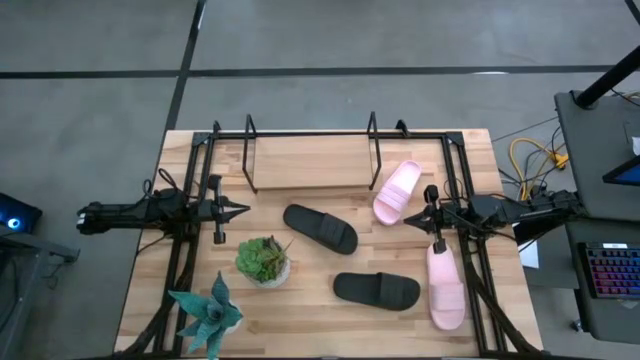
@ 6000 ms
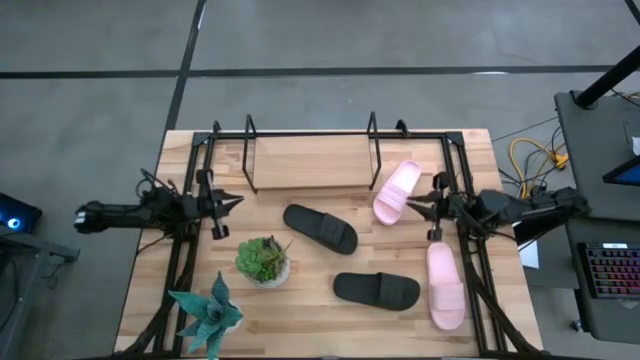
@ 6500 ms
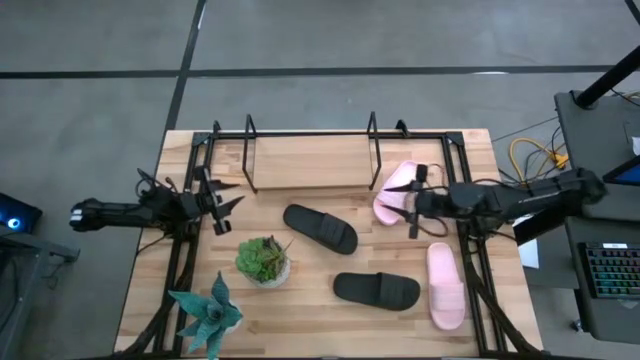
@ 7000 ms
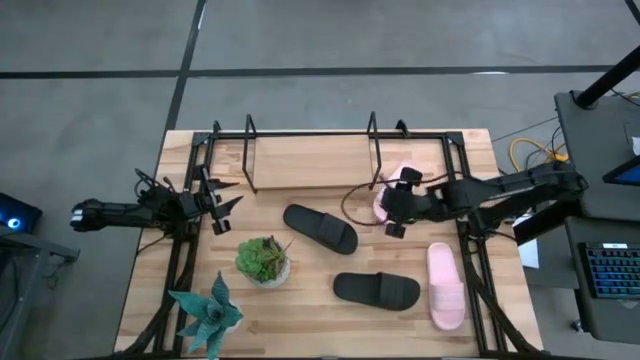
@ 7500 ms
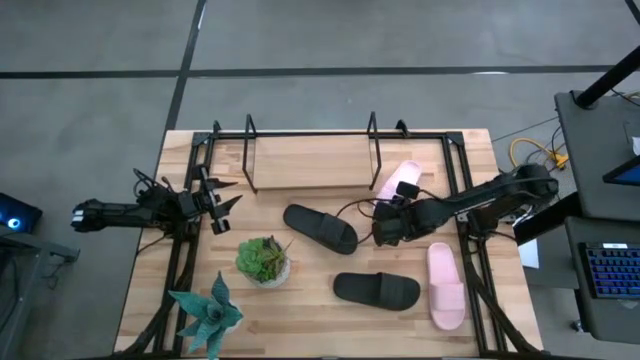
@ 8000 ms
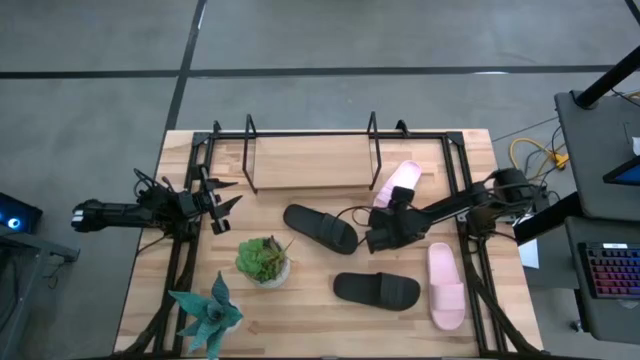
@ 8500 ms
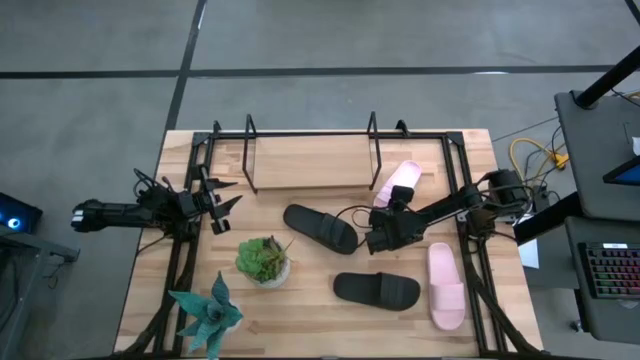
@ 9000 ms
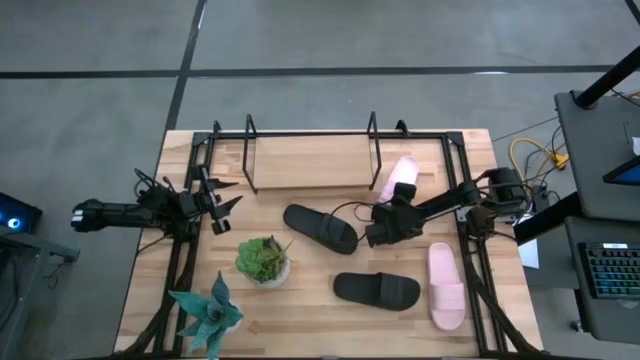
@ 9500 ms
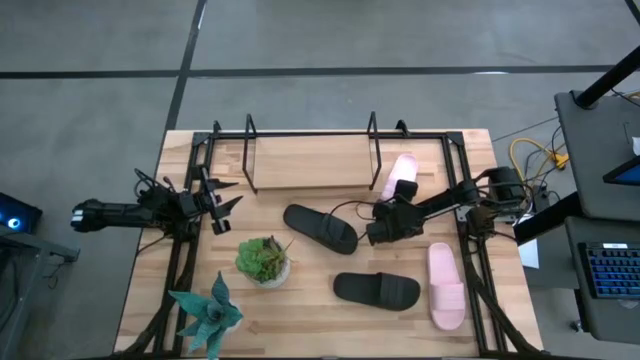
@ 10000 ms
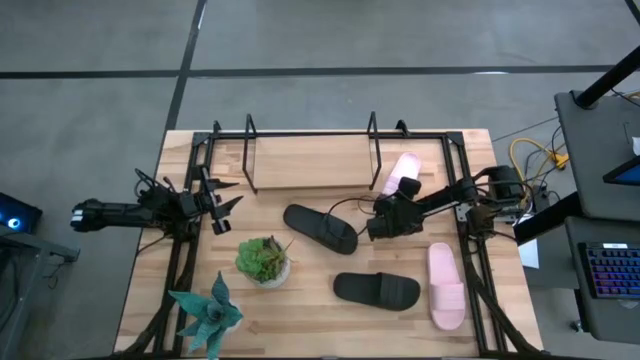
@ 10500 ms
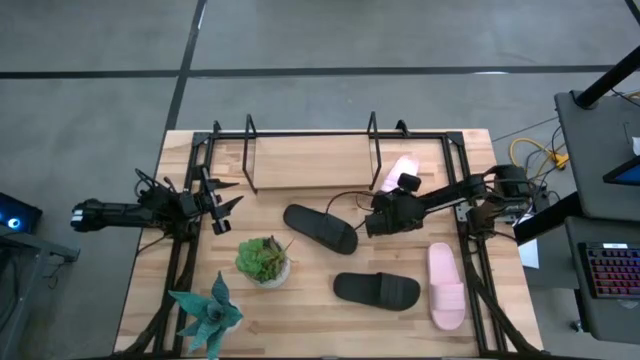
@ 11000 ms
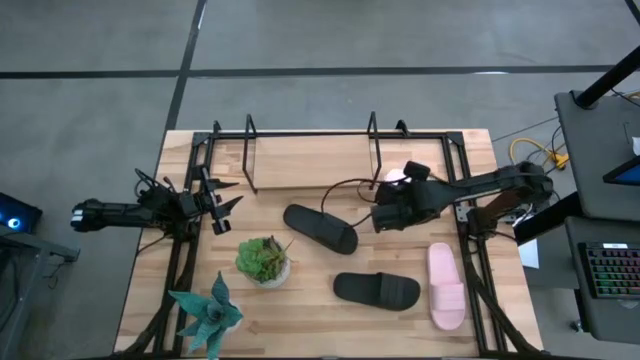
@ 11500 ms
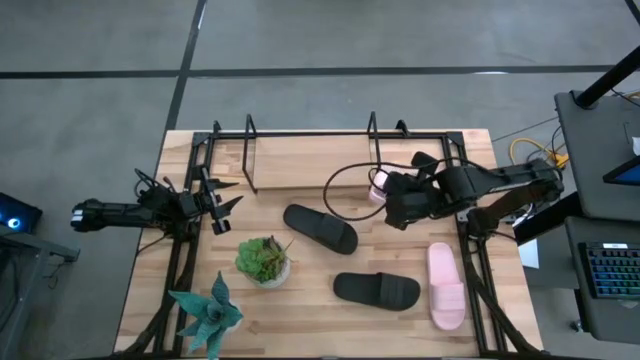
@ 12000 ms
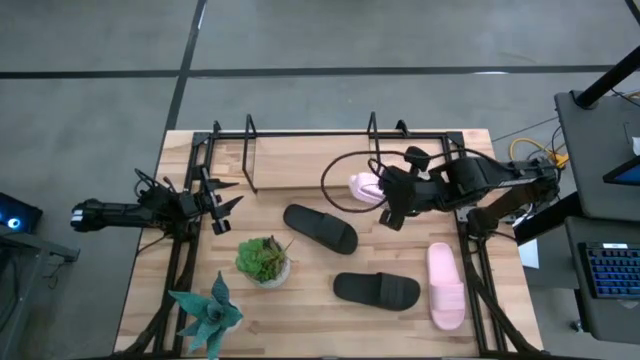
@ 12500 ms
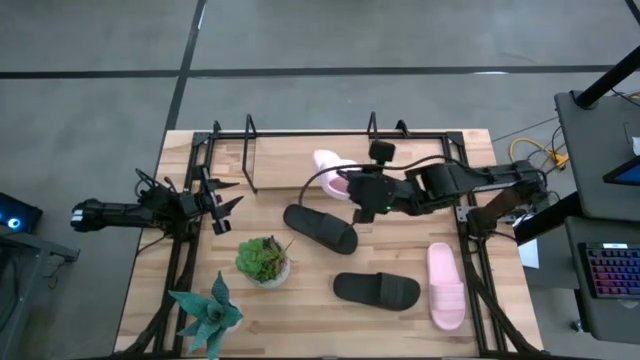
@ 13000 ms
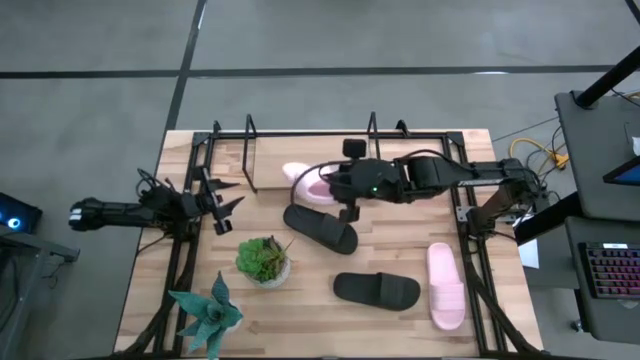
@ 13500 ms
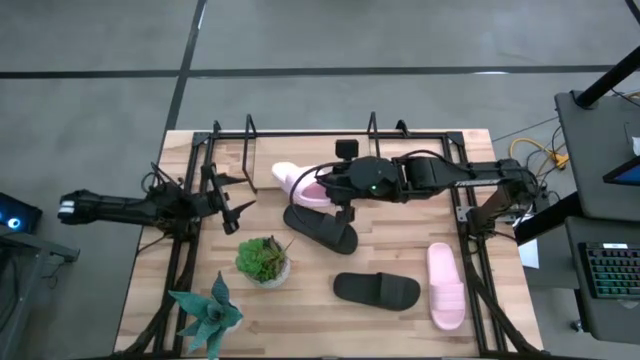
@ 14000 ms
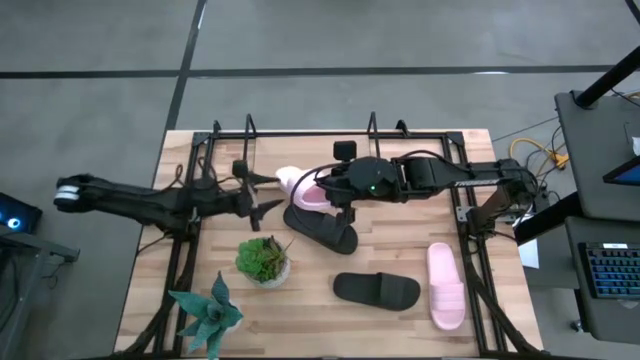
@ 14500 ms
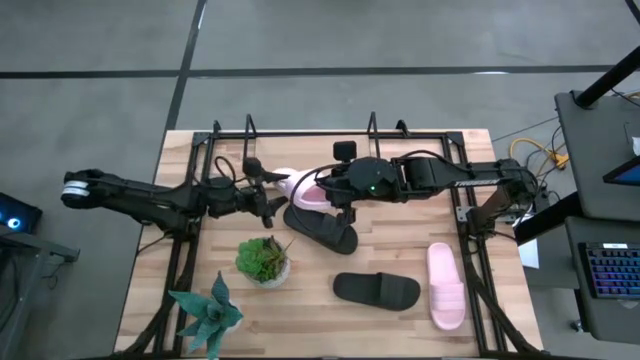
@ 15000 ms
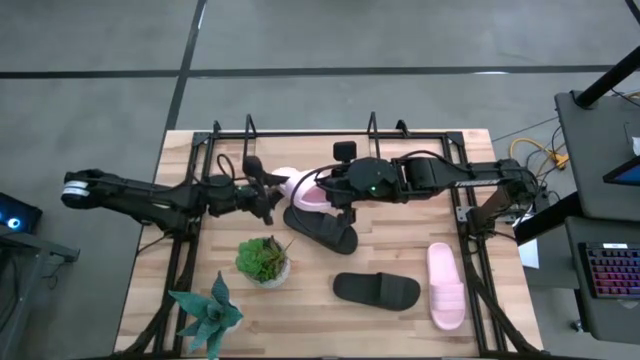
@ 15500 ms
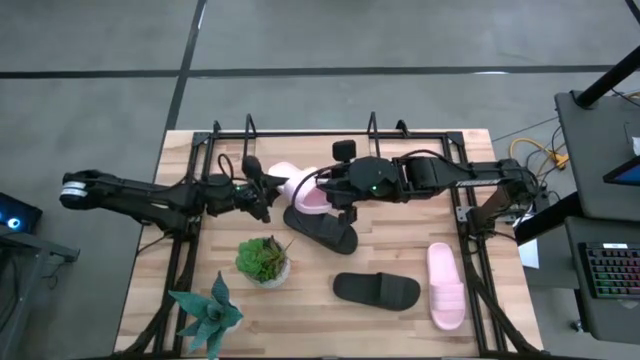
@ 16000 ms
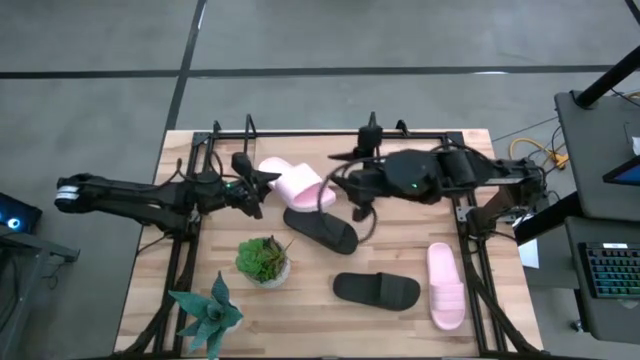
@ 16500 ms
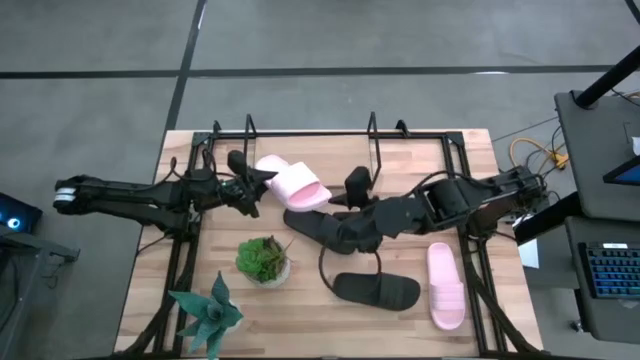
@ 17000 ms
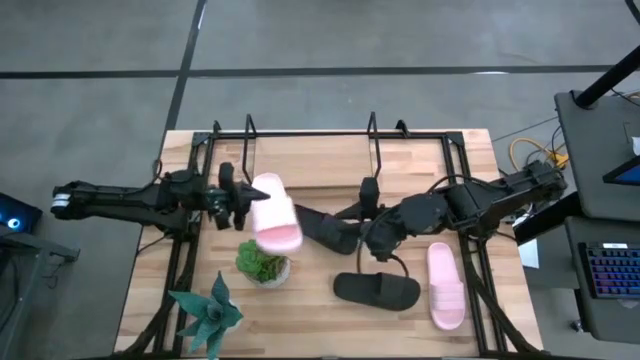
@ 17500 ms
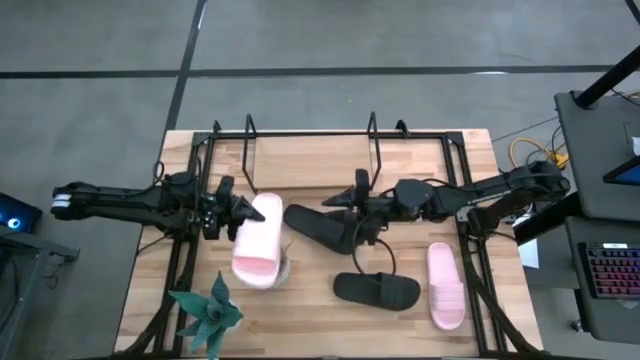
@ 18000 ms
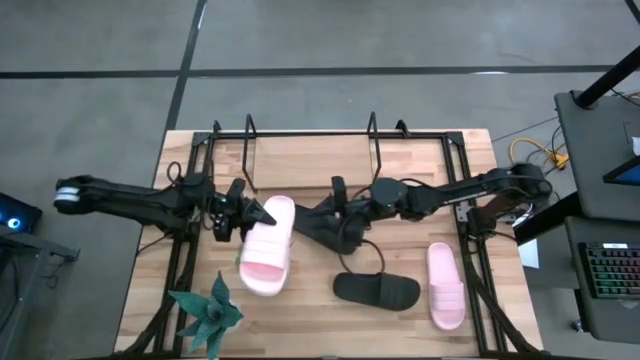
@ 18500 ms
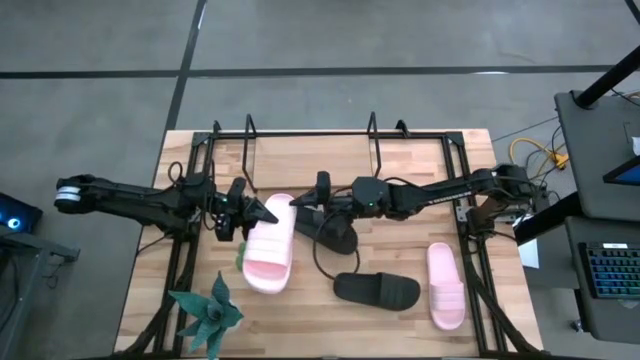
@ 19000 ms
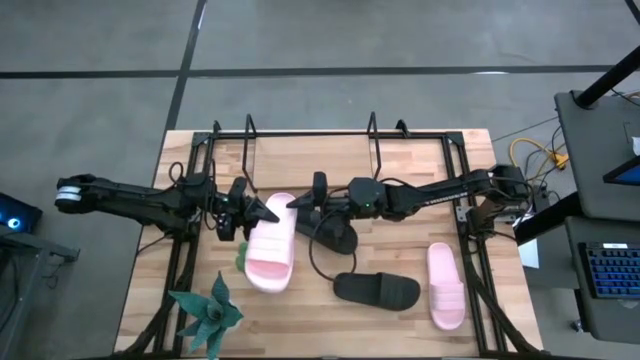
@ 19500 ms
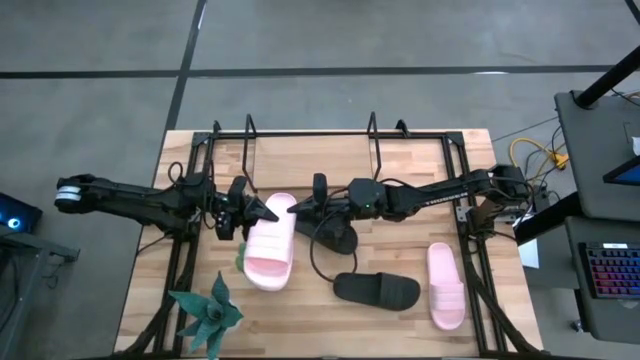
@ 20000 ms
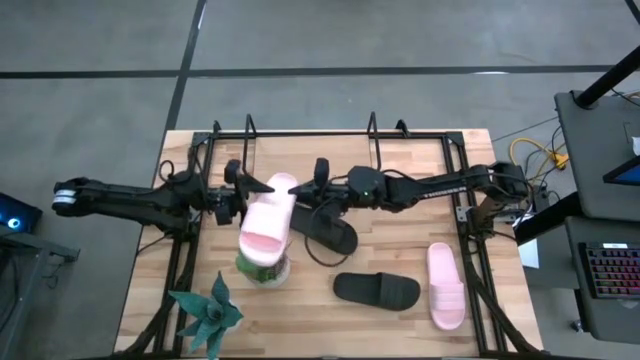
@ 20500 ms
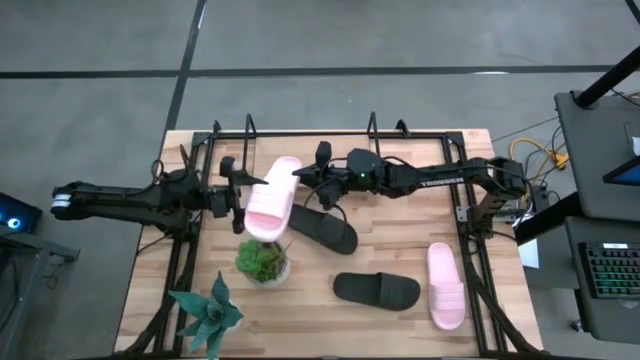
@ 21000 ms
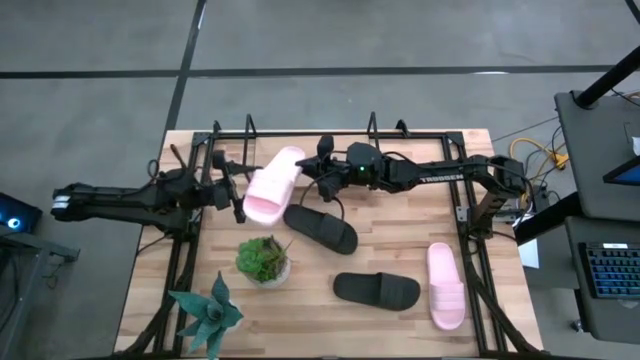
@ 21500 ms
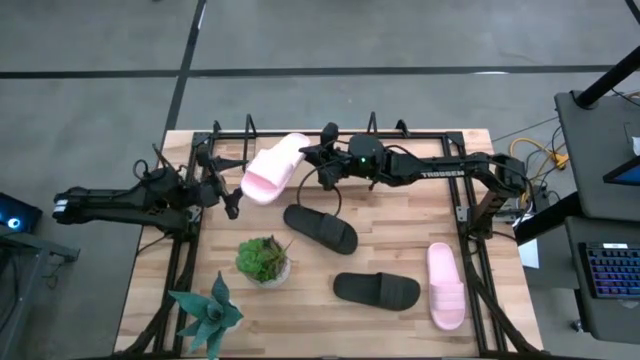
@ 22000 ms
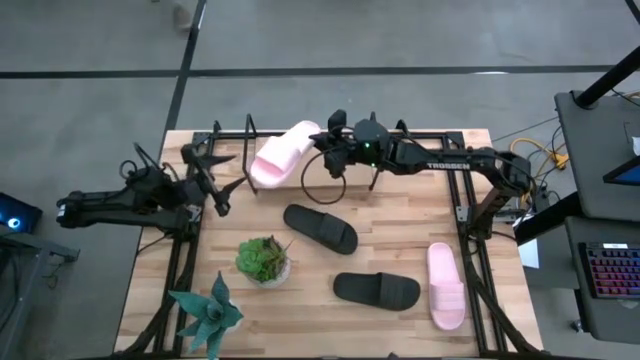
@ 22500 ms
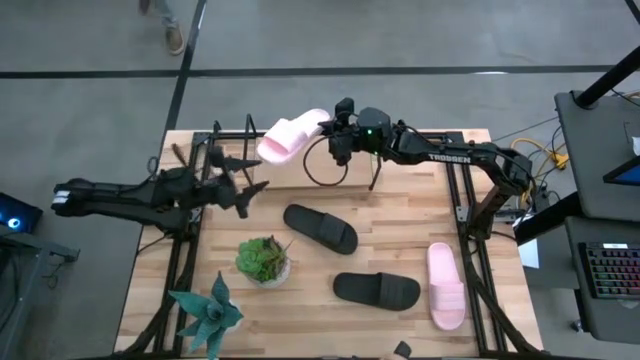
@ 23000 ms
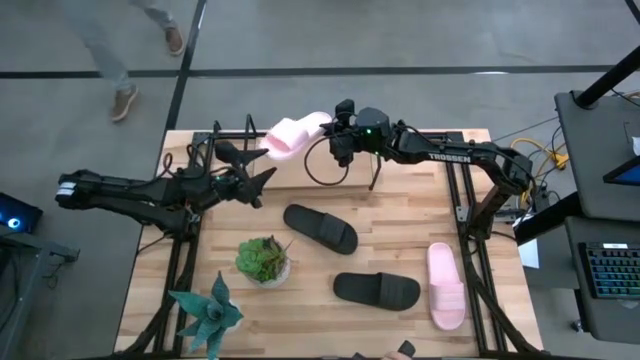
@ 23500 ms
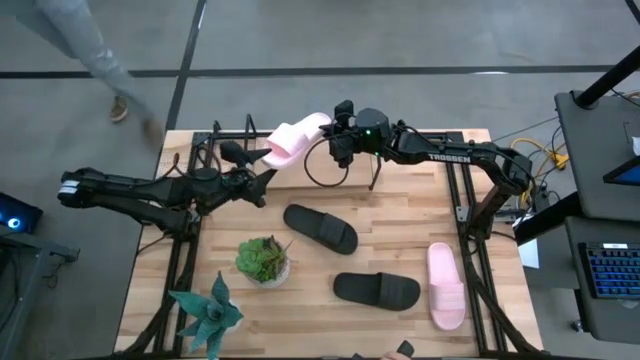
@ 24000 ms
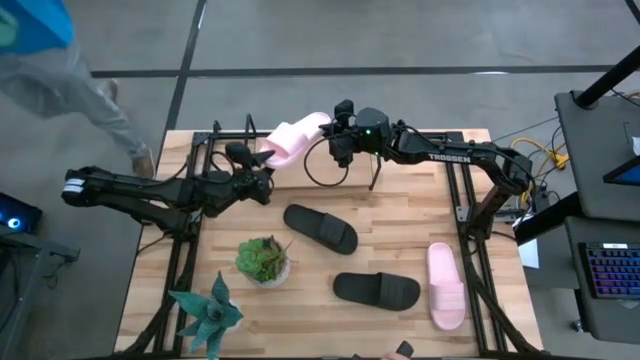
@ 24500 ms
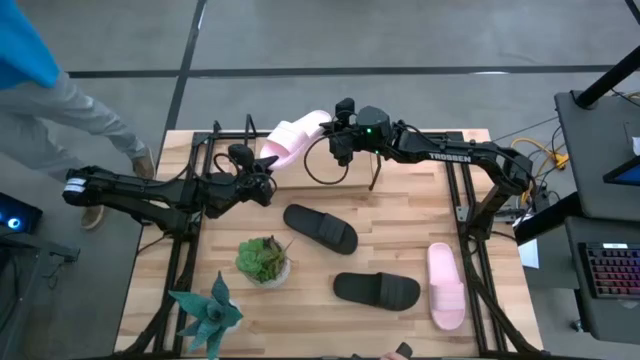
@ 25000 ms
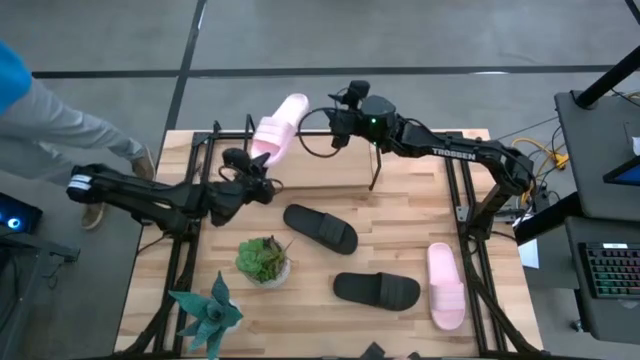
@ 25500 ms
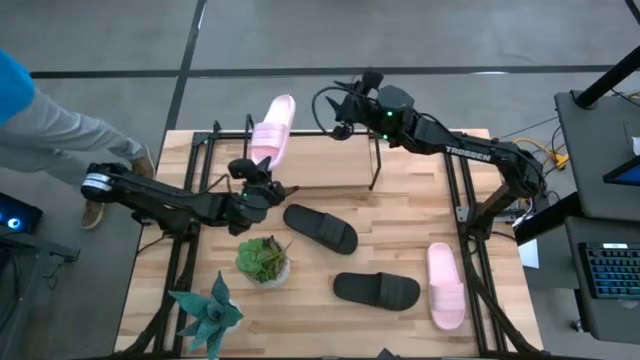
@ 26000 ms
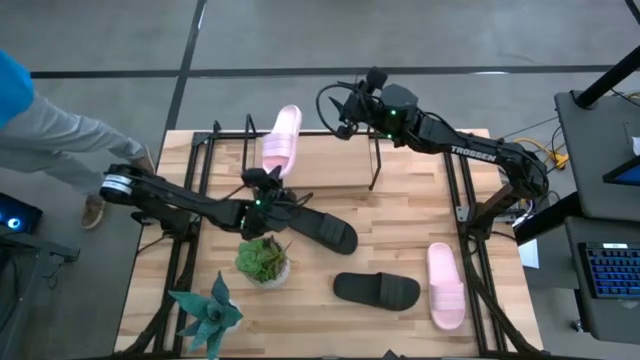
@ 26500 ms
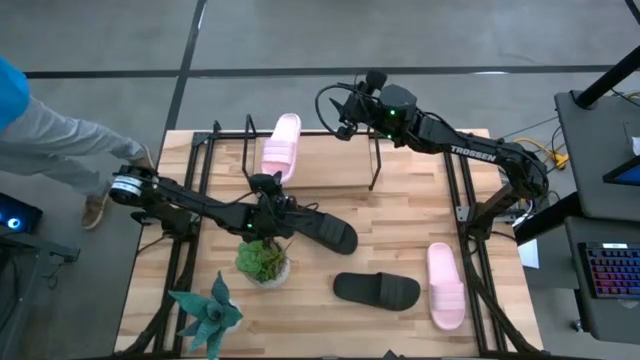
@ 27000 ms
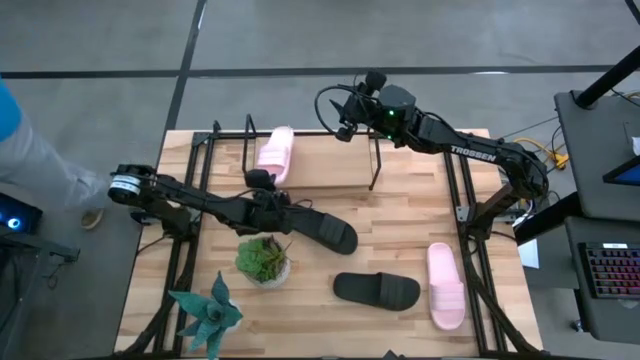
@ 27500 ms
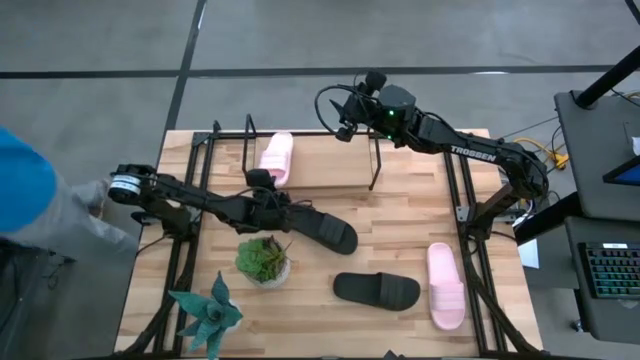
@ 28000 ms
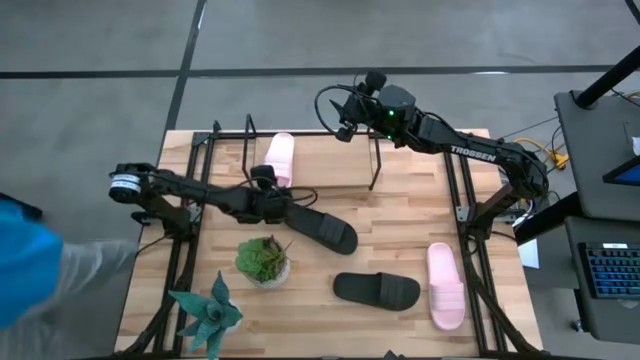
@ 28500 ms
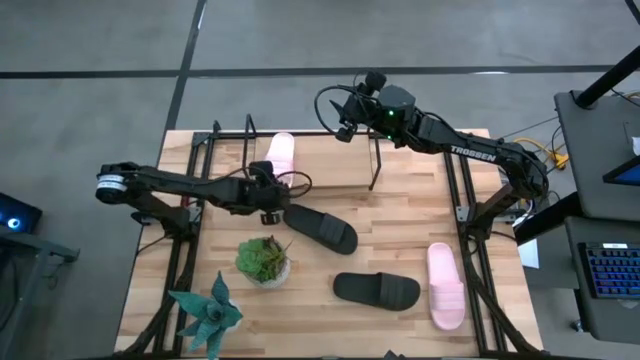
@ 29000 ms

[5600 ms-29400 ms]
Task: Pick and place slides into the shelf
Put the top pink slide on the shelf
